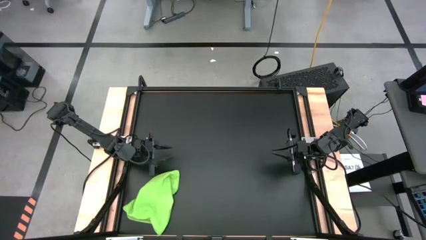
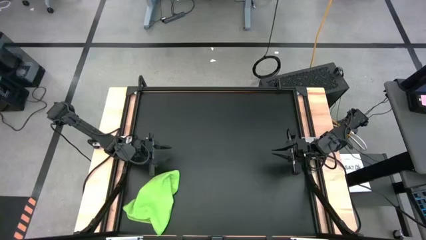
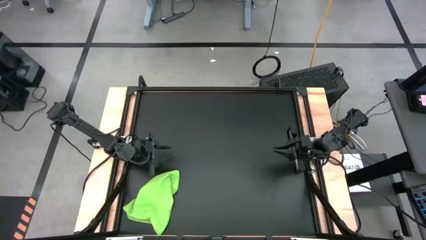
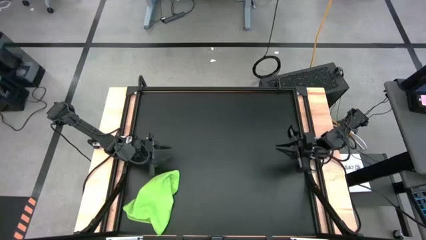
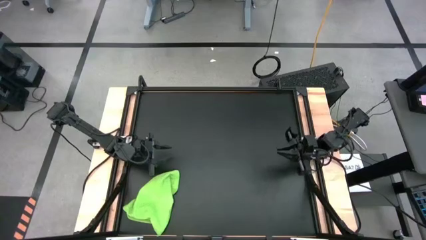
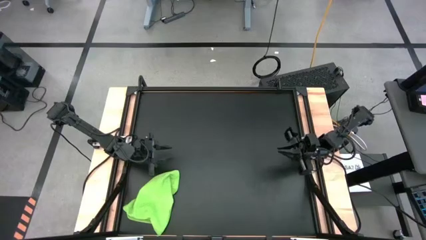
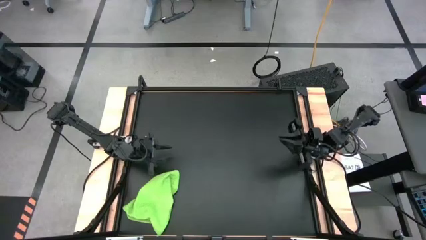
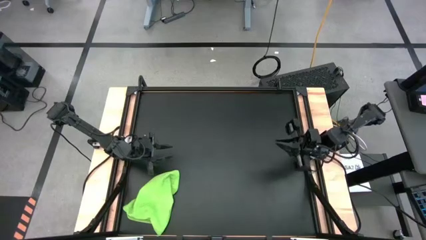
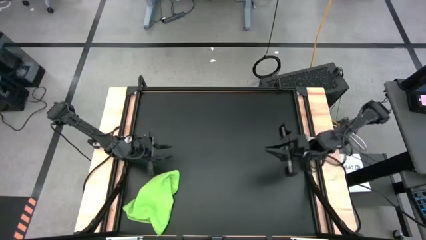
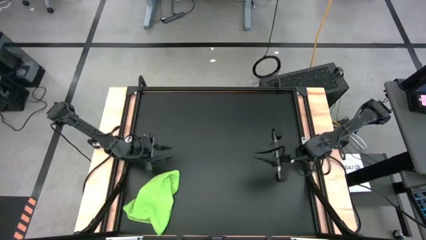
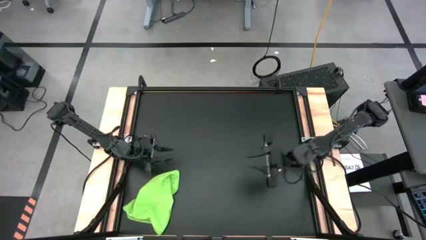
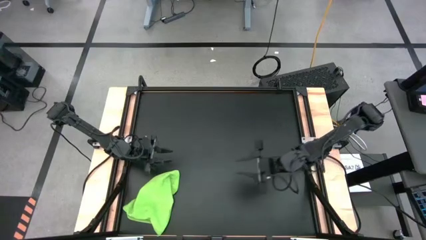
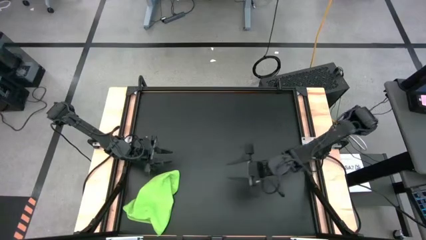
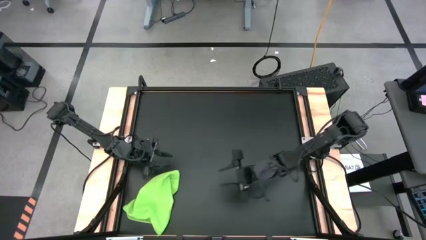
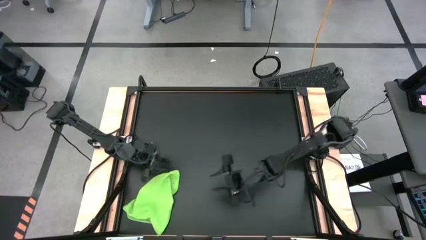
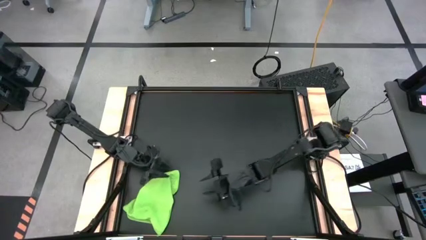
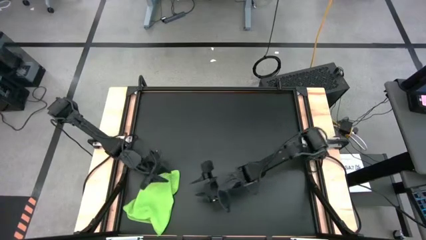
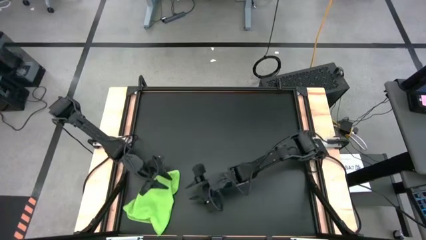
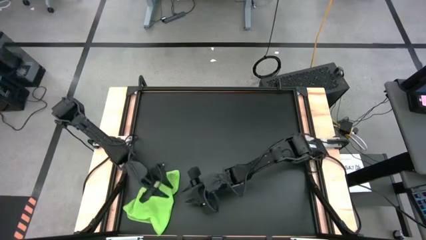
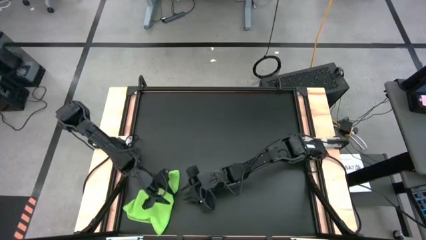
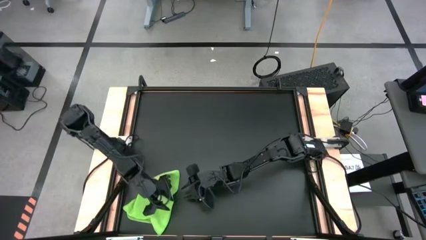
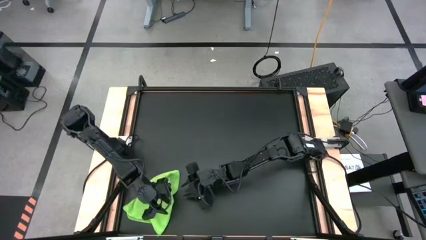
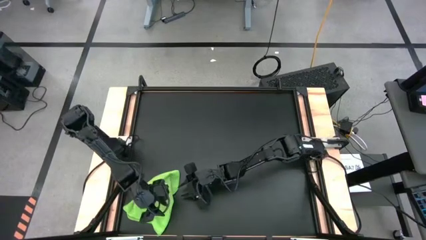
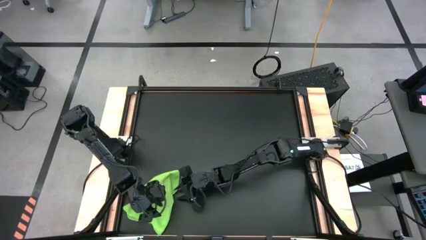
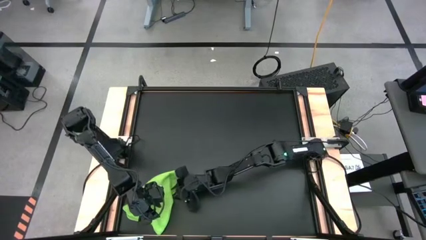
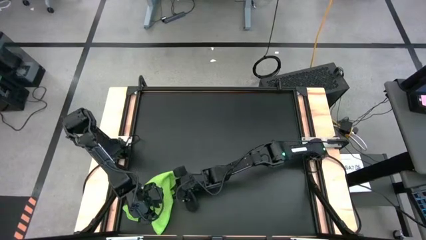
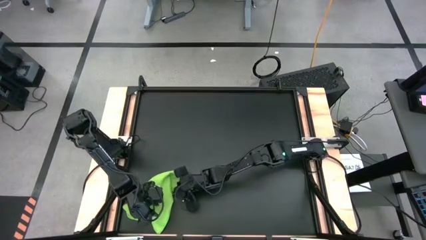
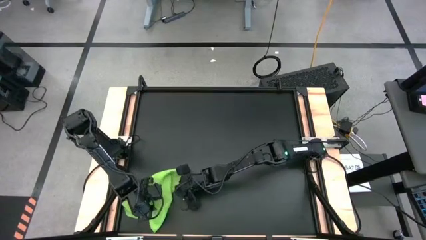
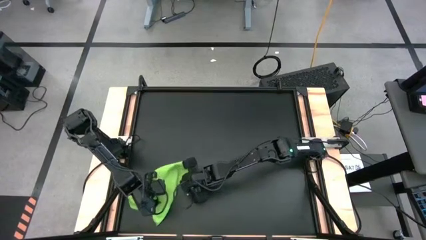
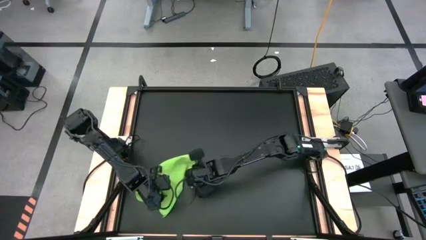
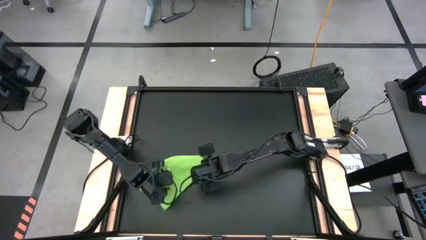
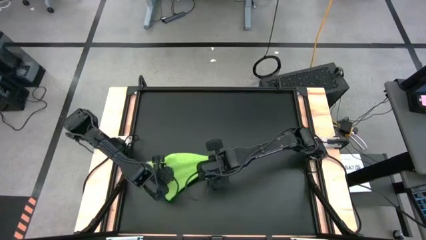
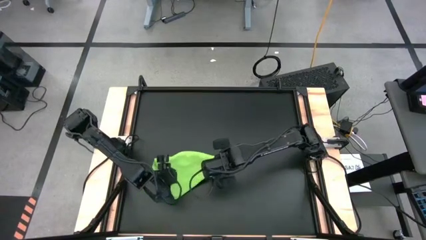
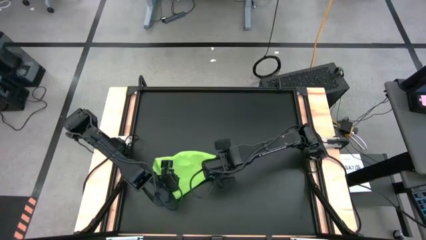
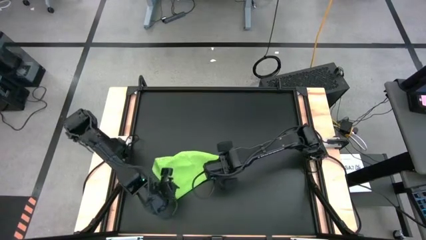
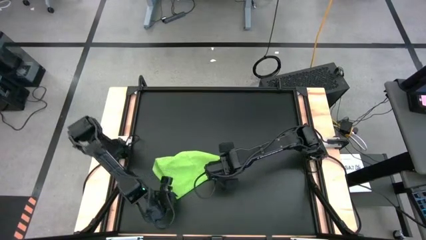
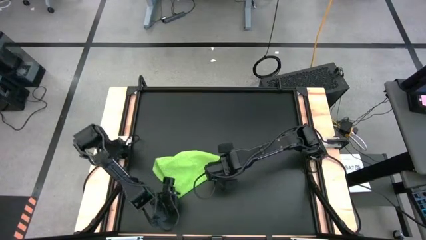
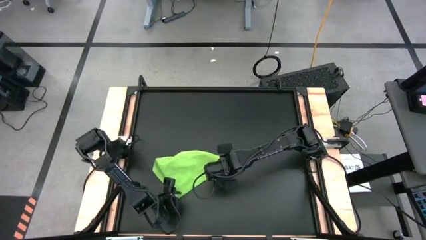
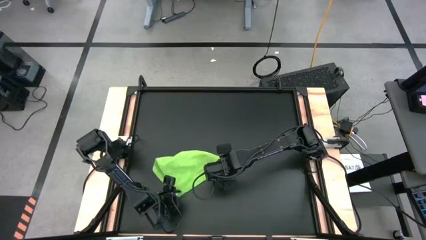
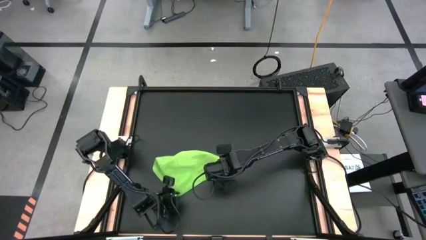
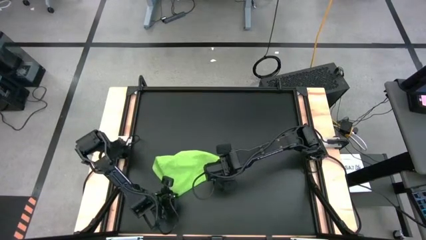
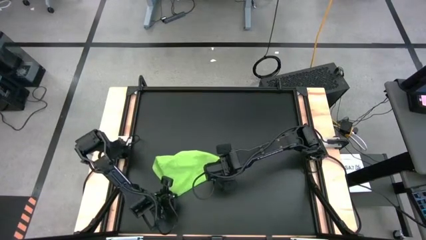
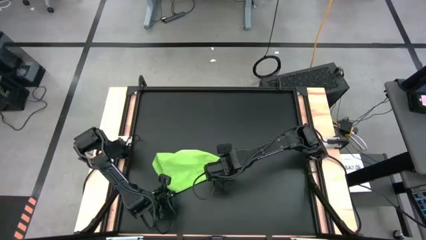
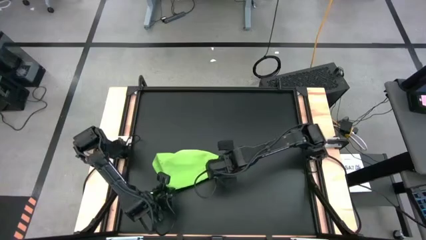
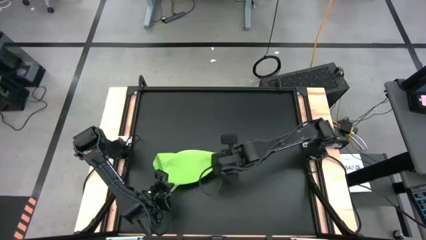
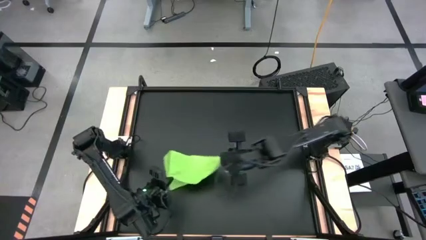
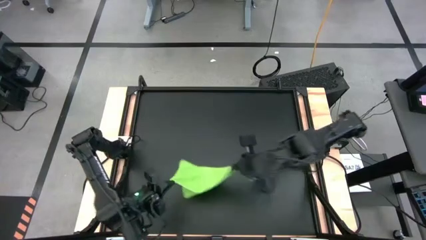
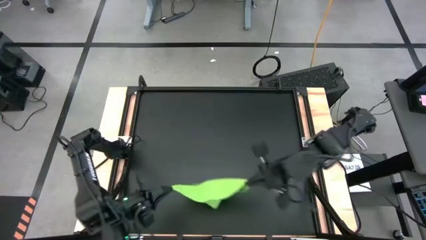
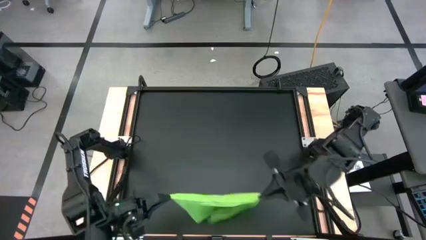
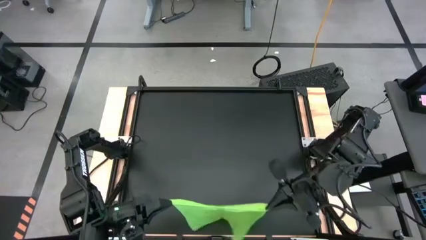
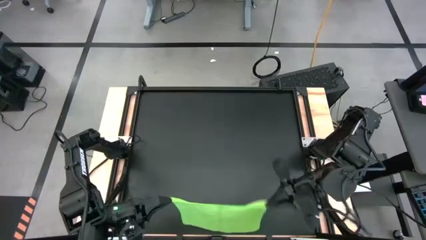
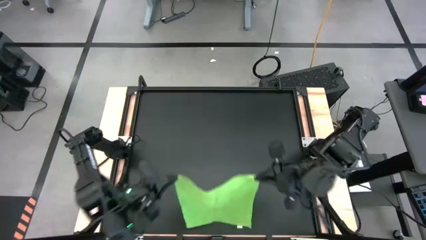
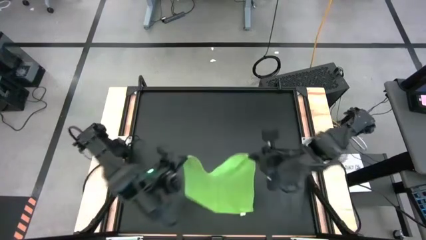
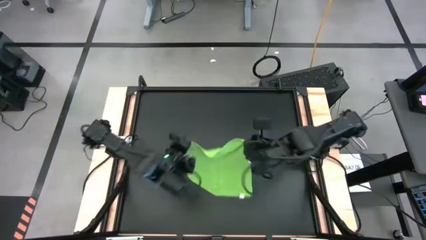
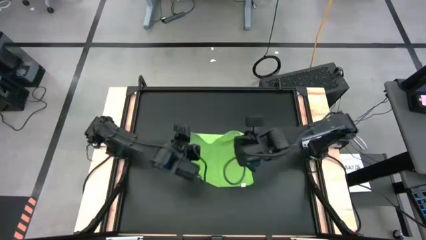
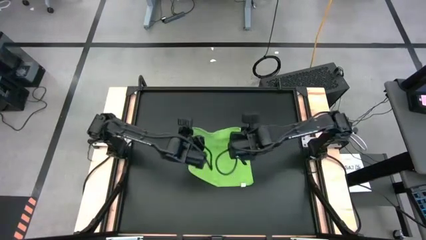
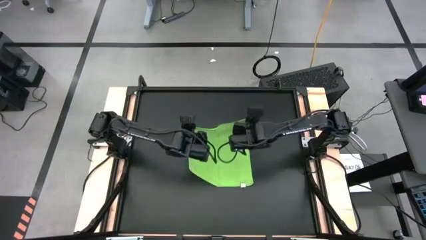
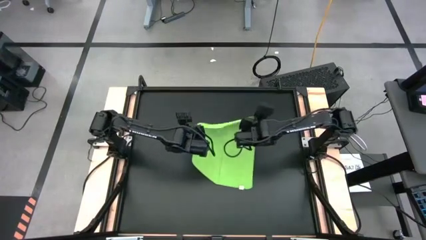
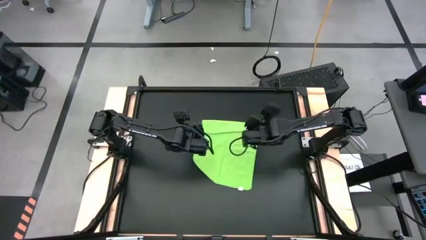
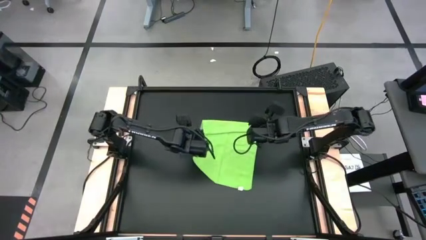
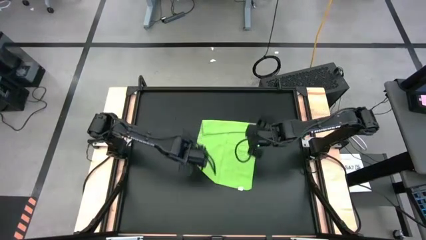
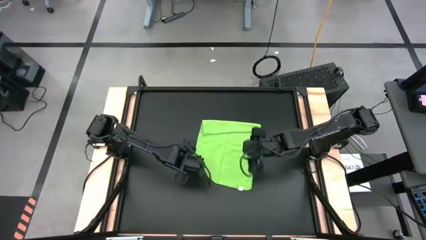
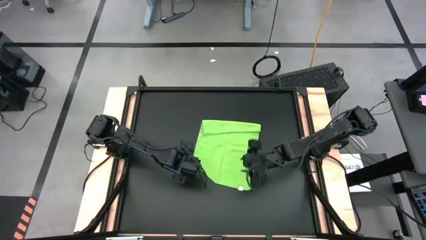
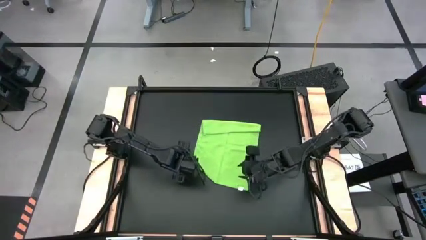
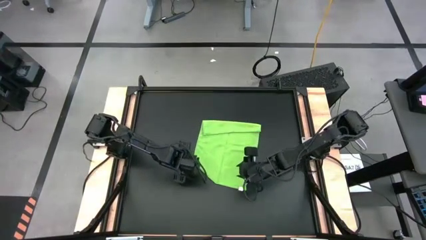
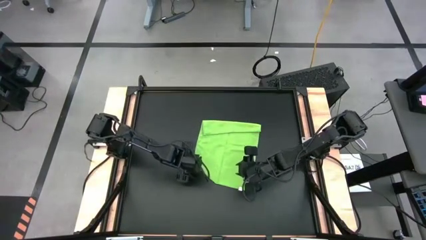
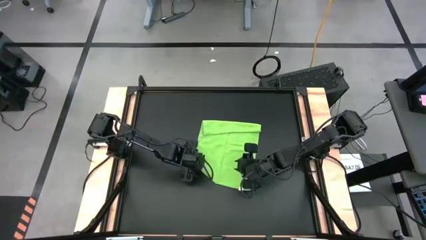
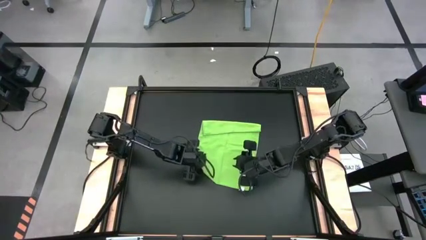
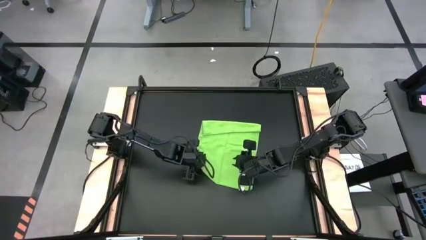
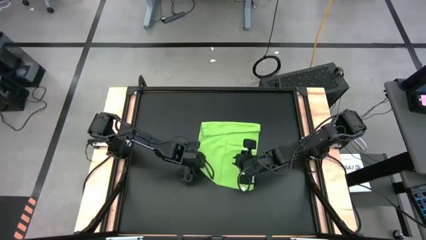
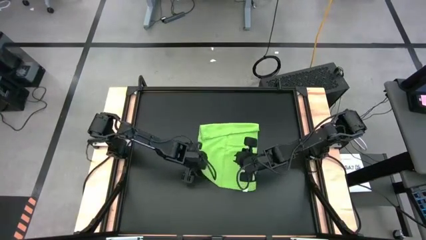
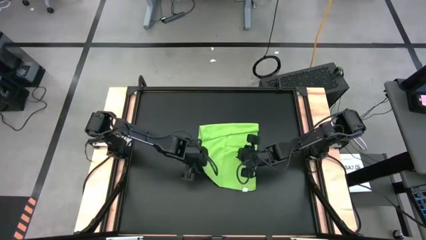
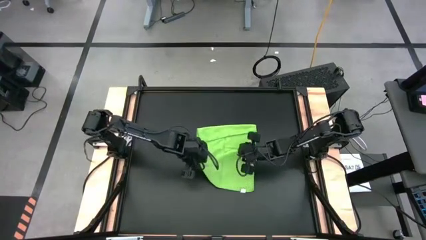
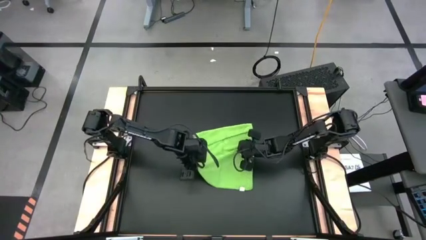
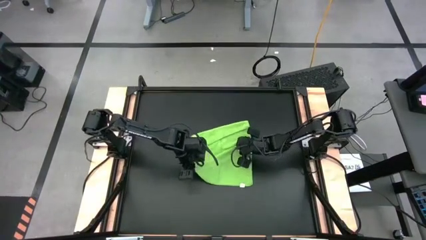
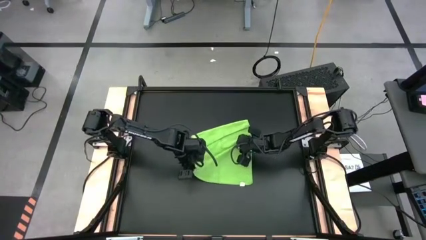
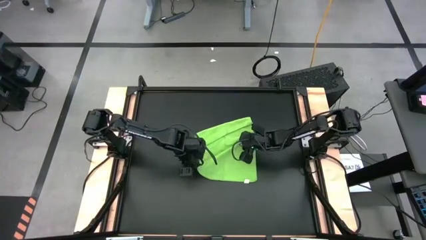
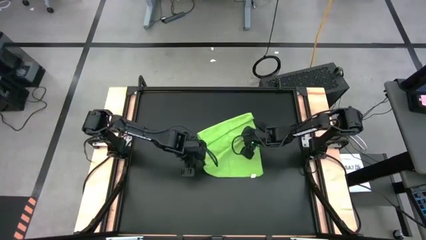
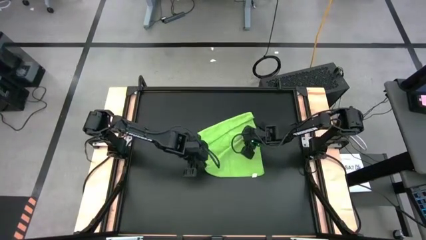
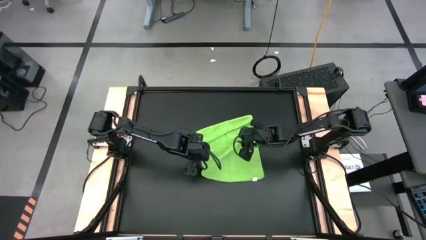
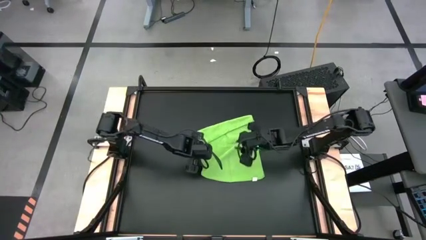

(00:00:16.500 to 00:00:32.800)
Task: Roll towel into tight, uniform cylinder
Fold the green towel
